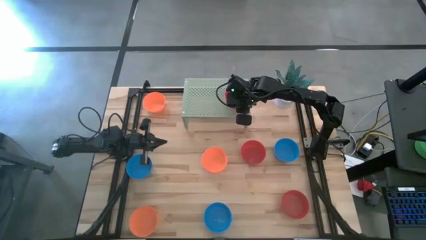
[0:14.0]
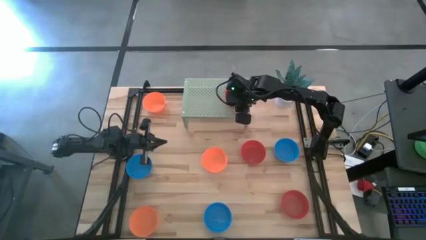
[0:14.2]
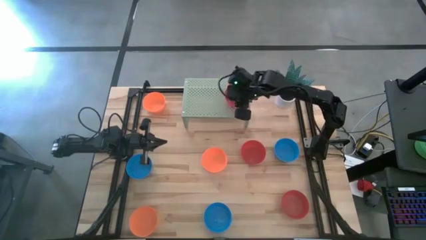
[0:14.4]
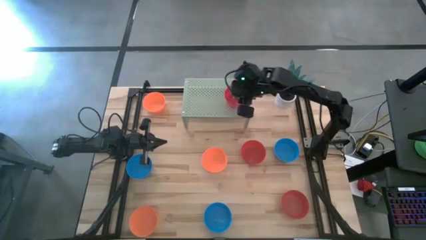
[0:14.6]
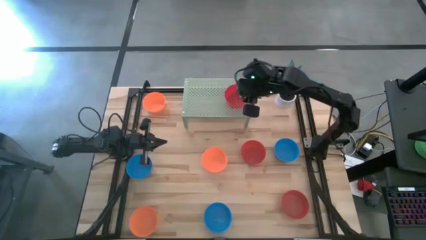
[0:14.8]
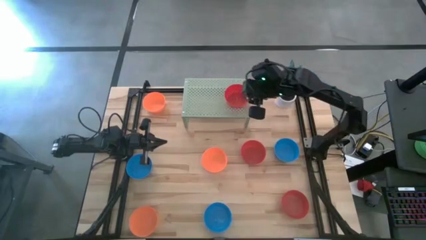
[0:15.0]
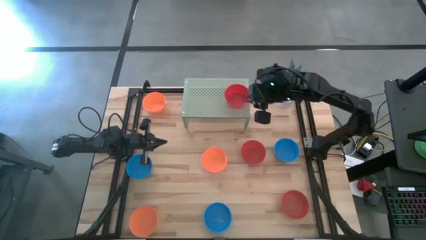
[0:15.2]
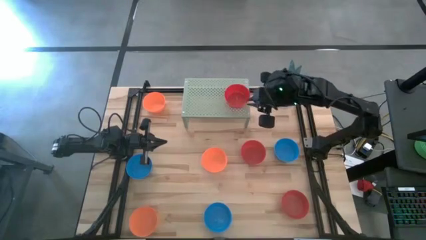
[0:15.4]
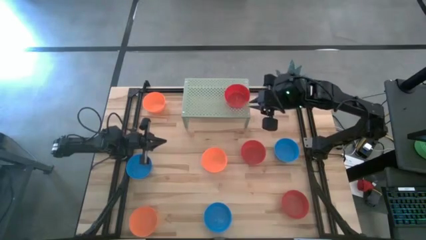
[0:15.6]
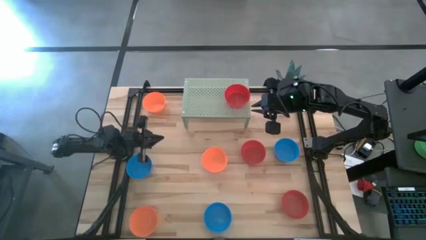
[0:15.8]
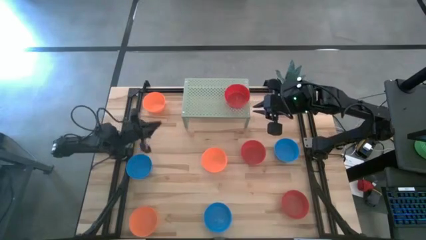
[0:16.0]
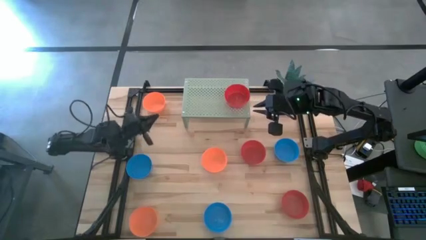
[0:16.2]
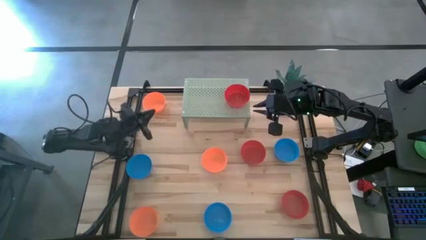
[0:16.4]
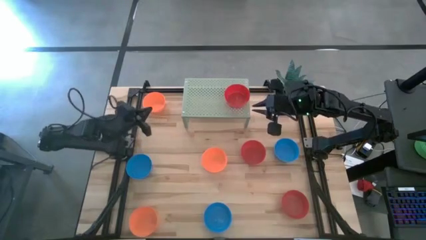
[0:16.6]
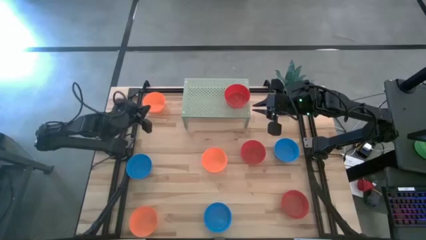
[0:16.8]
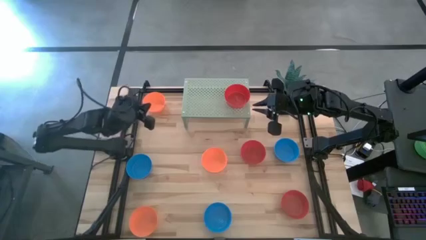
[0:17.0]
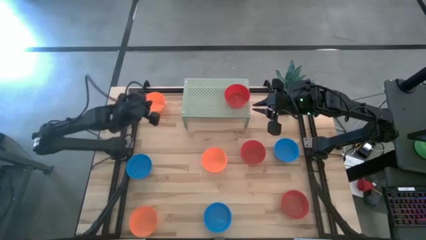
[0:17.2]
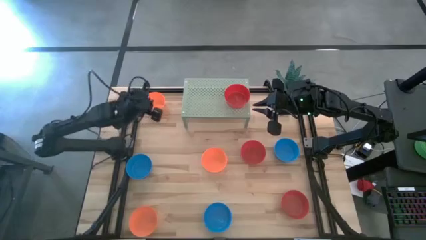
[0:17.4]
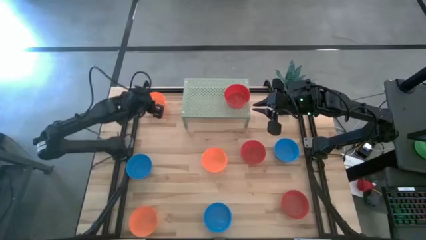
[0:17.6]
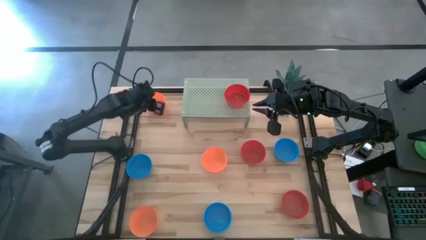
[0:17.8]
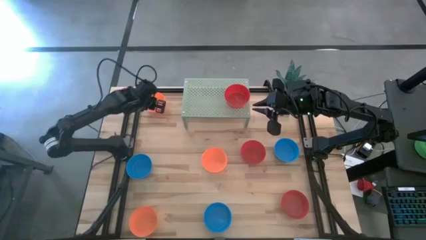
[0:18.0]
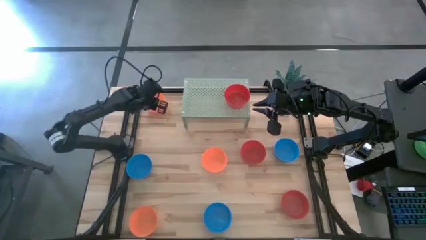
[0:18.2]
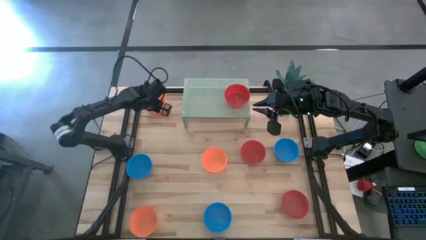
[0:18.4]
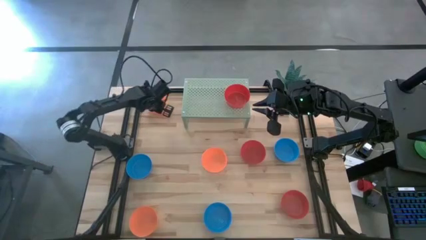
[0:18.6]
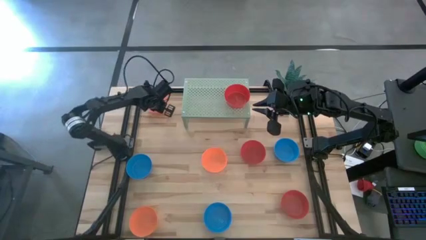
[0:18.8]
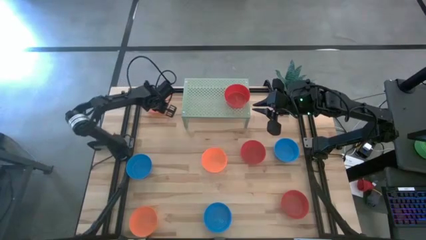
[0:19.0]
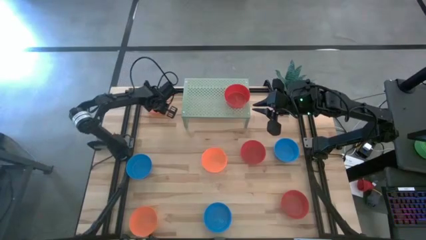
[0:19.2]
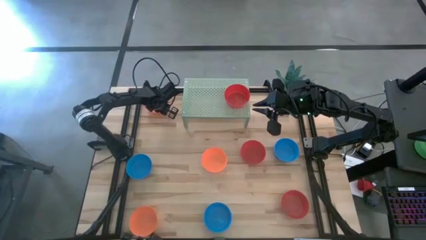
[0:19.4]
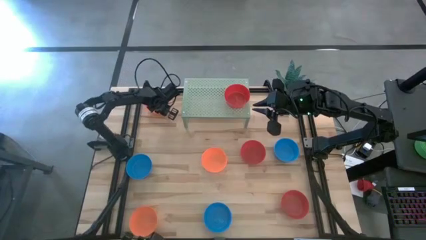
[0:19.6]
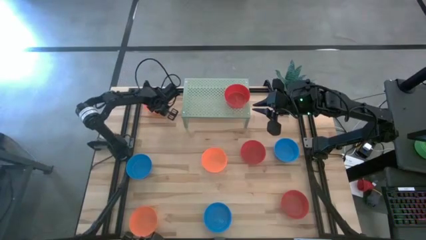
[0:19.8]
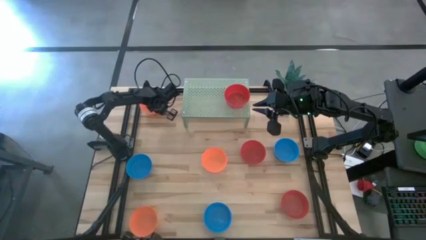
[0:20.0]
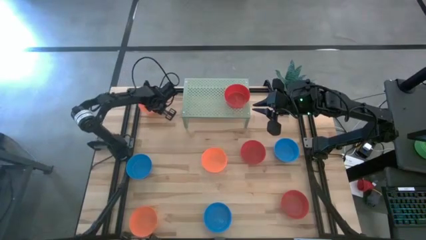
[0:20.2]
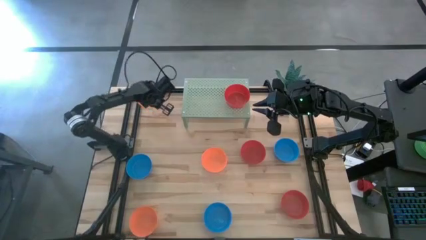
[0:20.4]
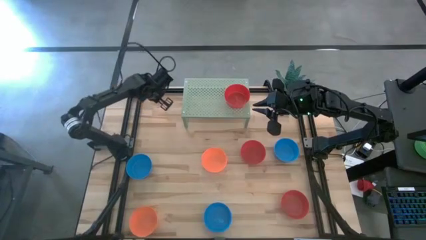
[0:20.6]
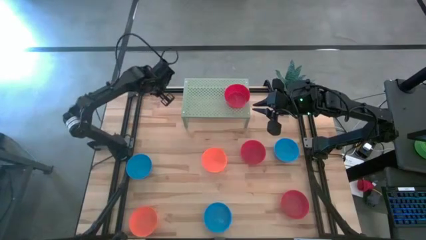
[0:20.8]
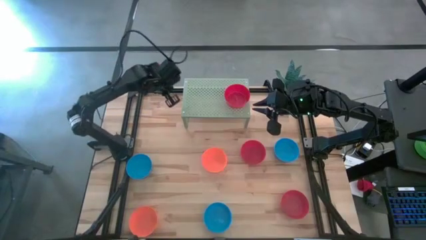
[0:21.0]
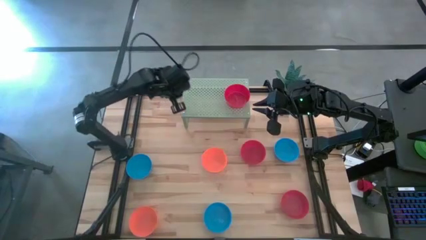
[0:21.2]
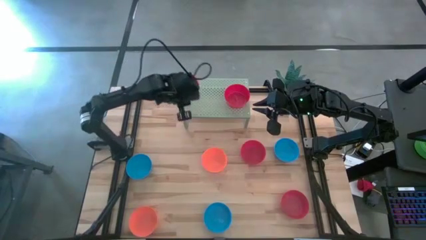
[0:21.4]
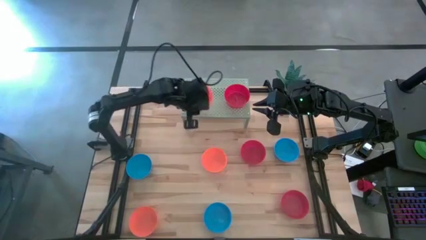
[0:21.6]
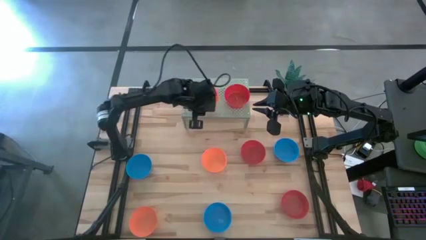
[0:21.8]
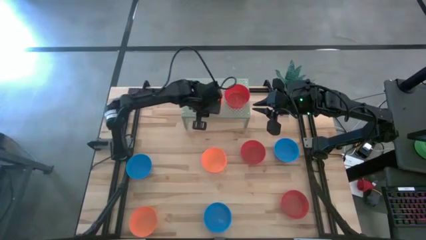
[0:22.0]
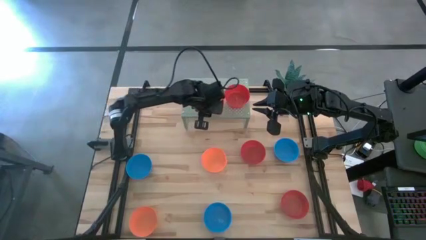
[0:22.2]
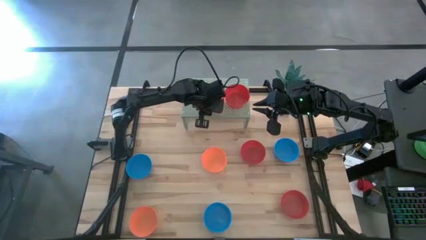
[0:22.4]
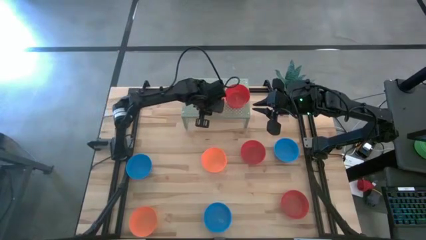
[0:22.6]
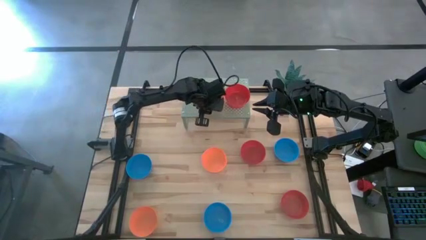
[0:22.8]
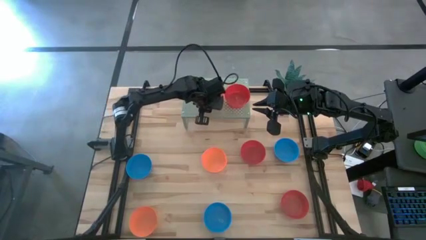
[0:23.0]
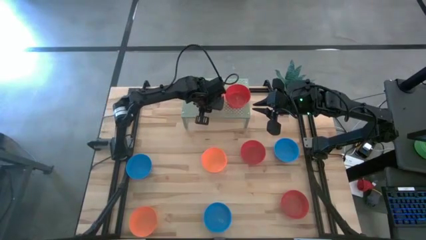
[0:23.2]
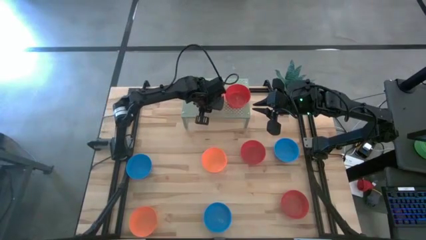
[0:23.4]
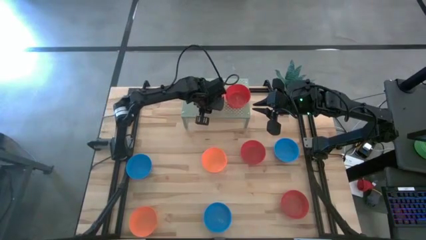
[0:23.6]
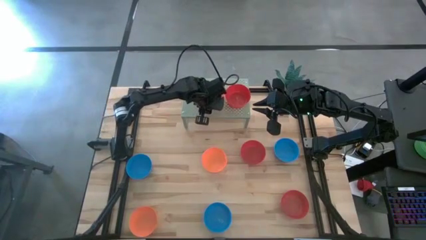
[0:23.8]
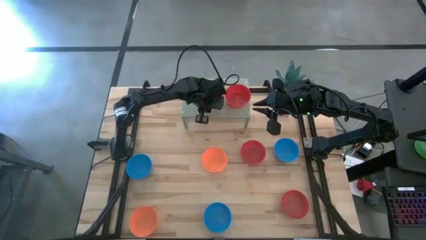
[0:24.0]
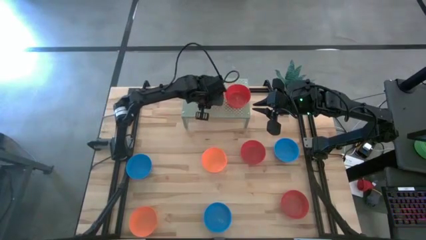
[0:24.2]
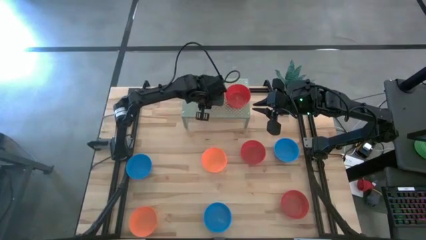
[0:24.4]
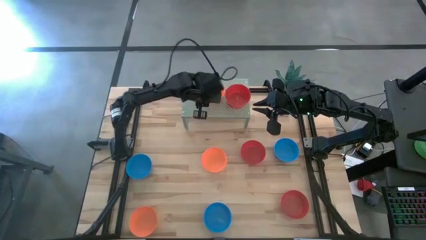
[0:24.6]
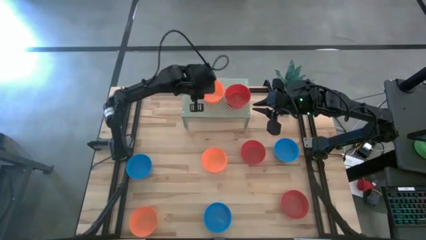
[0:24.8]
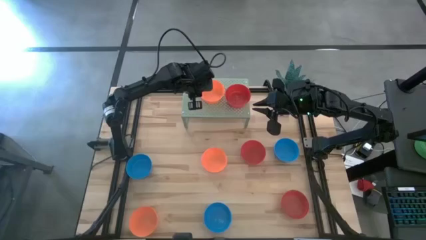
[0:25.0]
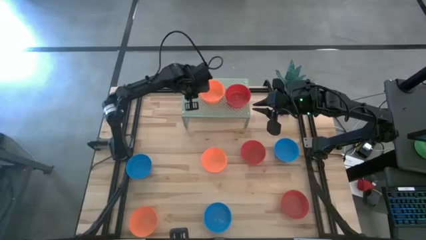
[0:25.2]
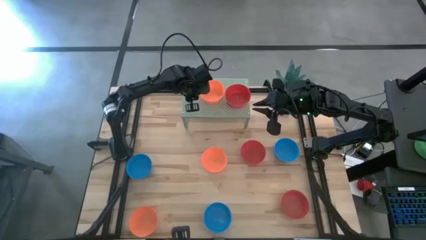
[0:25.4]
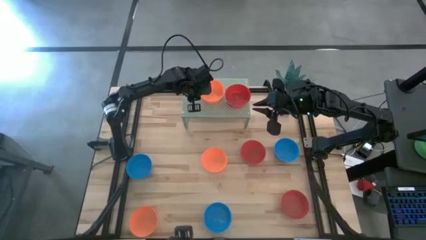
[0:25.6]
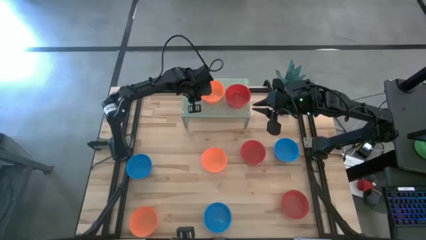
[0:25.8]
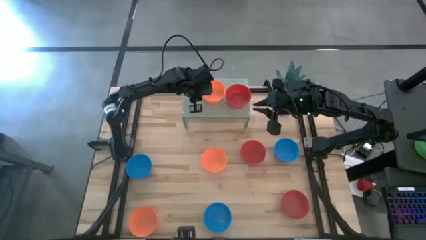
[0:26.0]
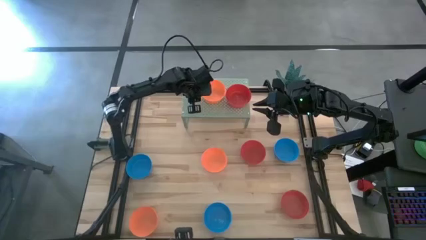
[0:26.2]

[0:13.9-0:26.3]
Task: Pick & Place Mini bowls
Put the top orange bowl on the shelf

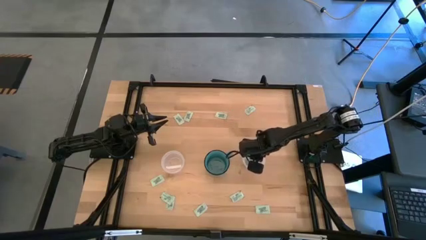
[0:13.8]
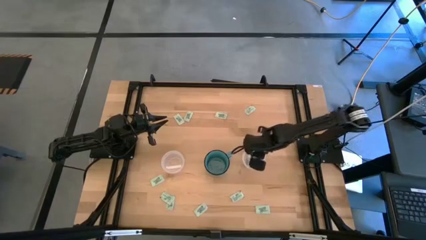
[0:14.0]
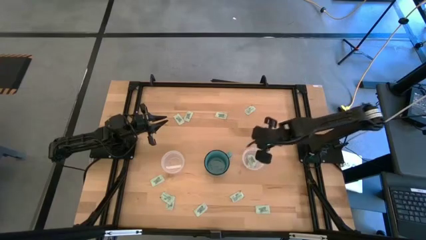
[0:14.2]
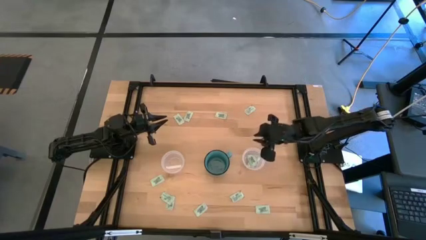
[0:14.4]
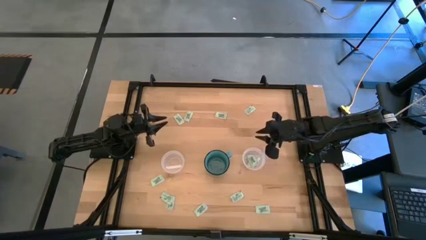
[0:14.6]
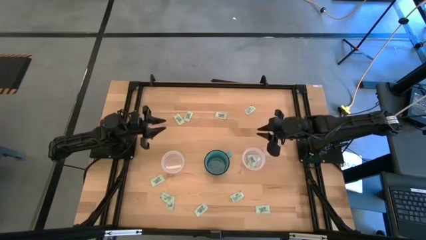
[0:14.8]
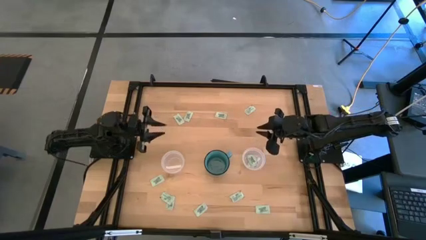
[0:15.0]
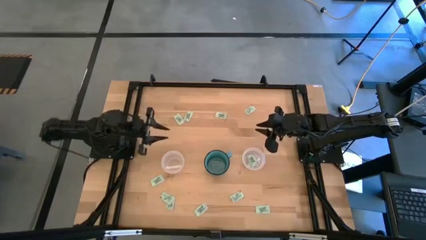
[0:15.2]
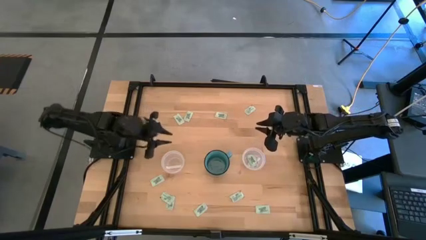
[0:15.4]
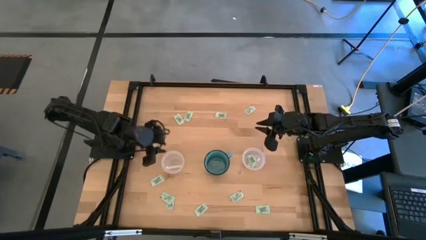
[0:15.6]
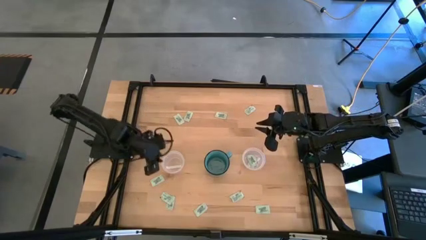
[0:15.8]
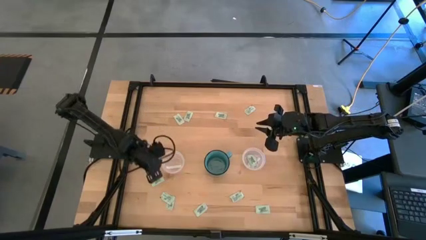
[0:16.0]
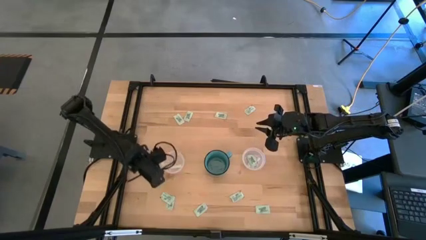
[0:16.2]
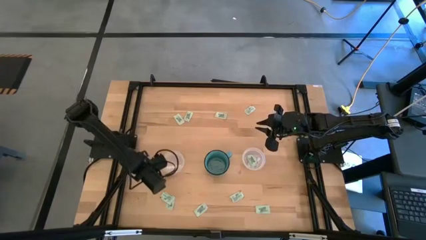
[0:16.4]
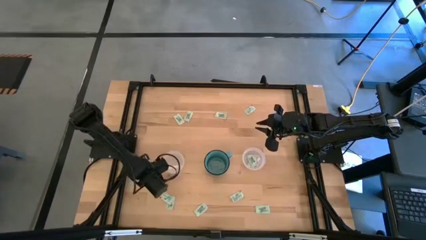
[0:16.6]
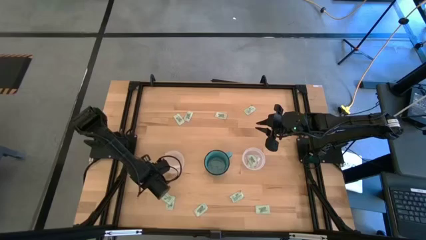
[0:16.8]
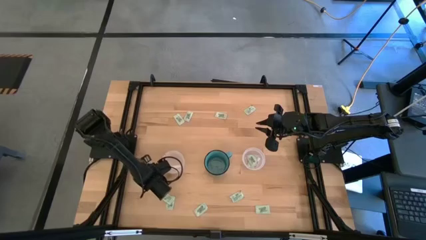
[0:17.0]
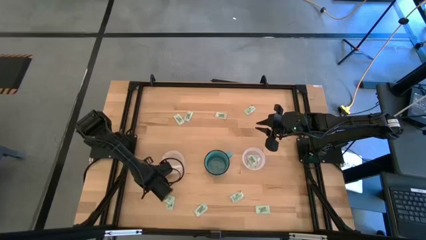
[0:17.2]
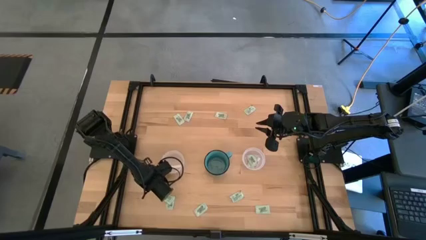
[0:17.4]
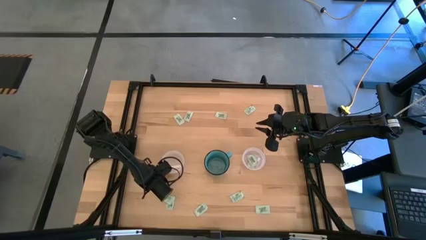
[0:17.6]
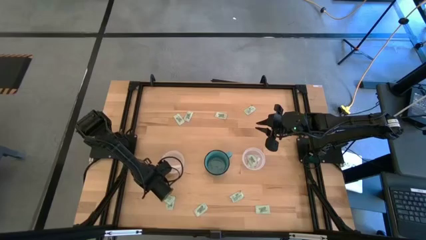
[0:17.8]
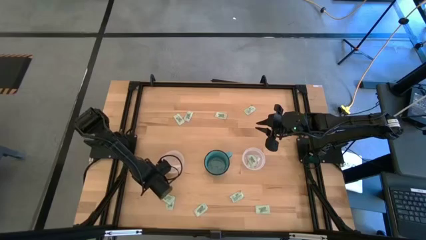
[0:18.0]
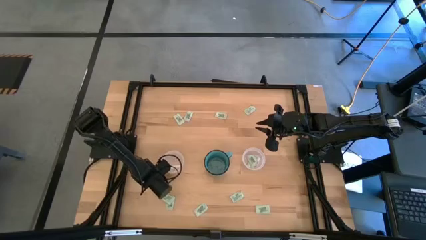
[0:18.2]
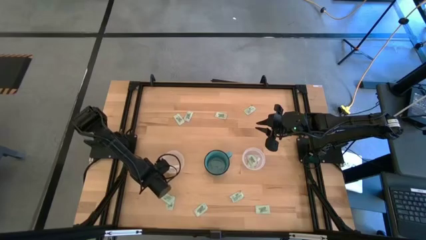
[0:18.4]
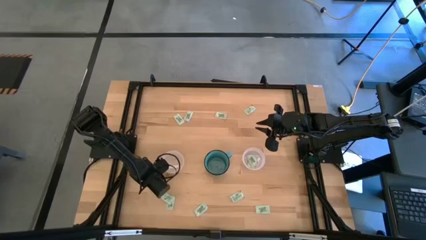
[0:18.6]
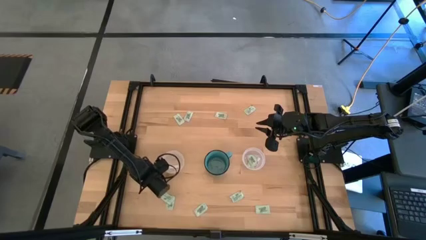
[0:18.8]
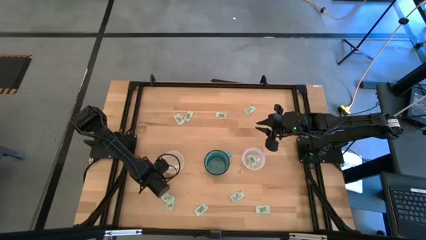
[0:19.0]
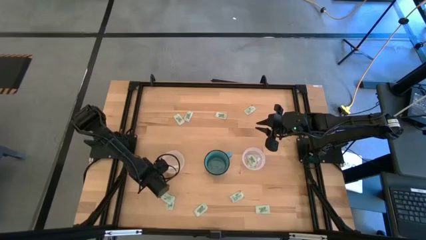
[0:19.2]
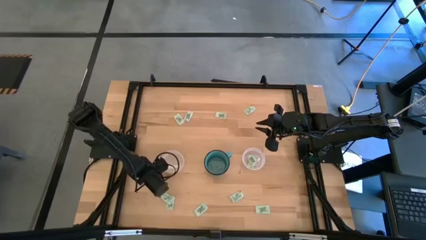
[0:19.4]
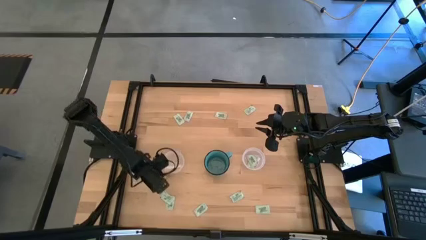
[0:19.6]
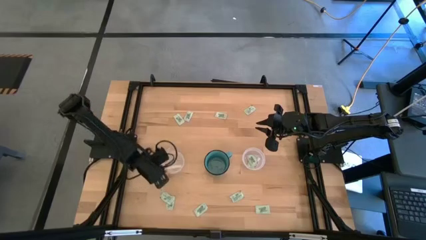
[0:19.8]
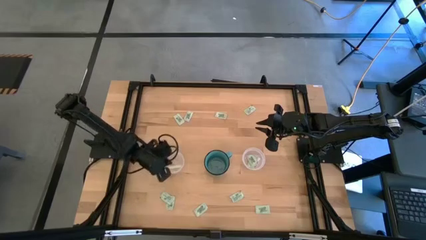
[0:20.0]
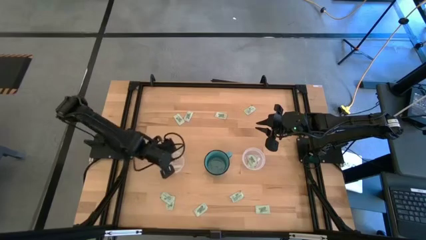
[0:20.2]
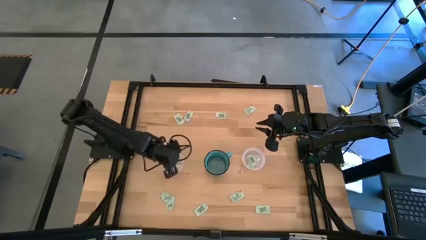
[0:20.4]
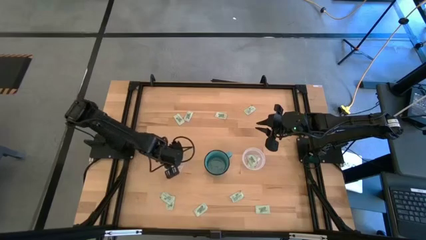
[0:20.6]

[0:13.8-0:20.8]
Task: Pick and place Stevia / Truvia into bins
Put the green stevia packet into the left transparent container
